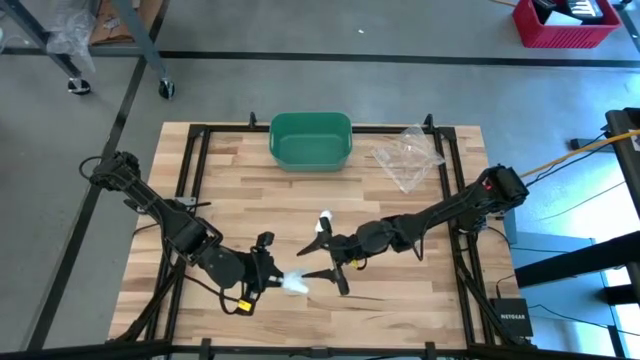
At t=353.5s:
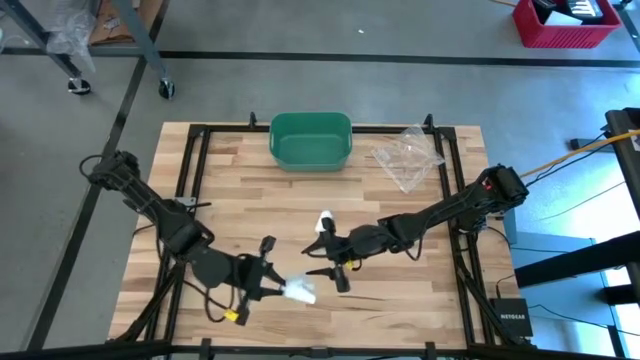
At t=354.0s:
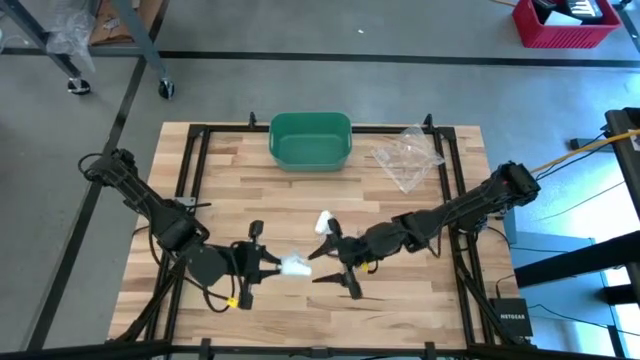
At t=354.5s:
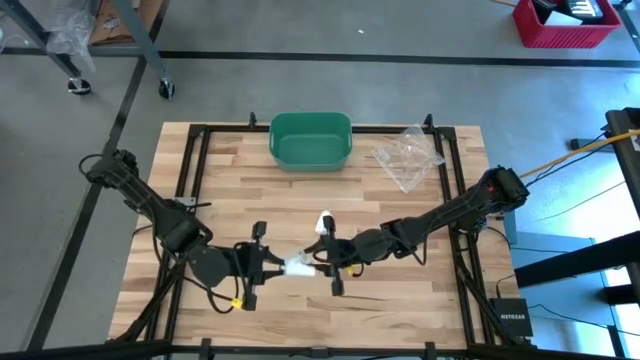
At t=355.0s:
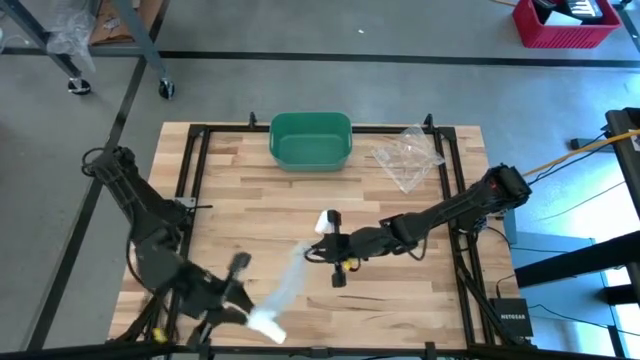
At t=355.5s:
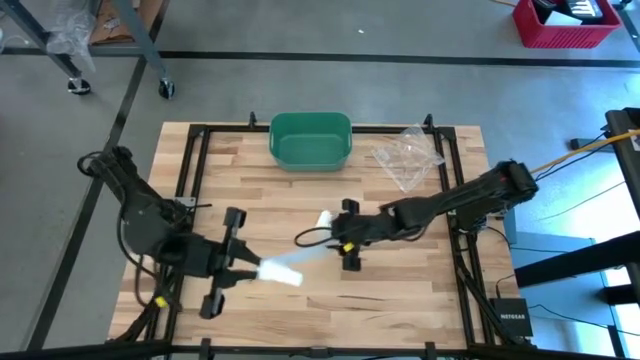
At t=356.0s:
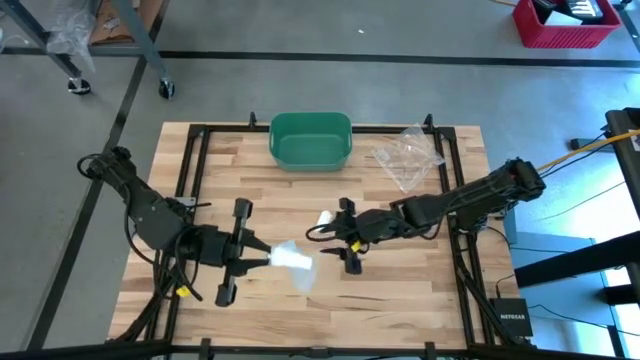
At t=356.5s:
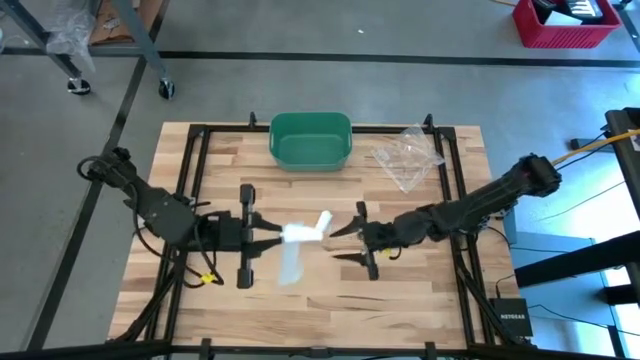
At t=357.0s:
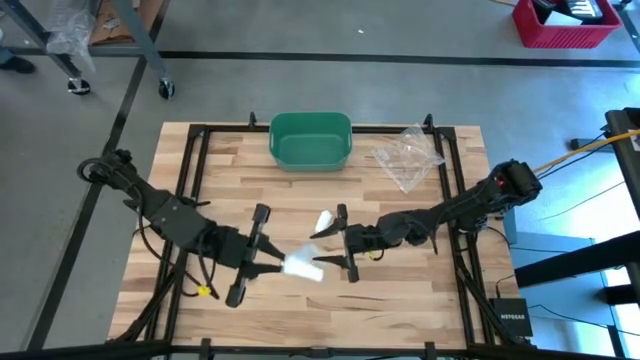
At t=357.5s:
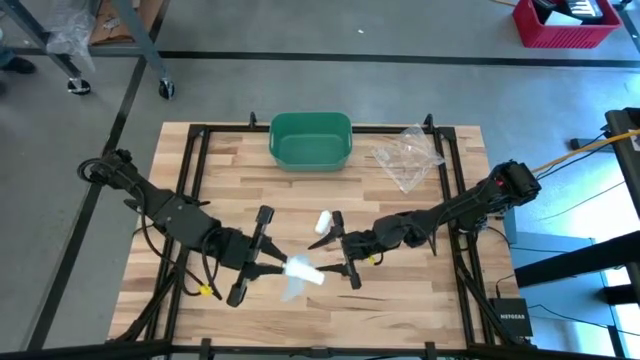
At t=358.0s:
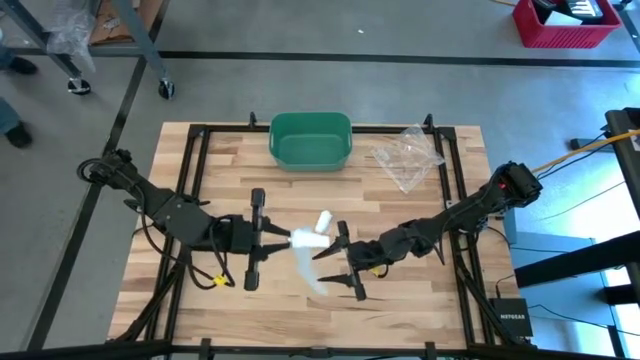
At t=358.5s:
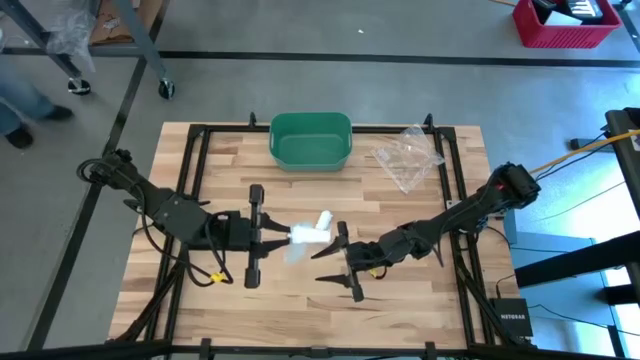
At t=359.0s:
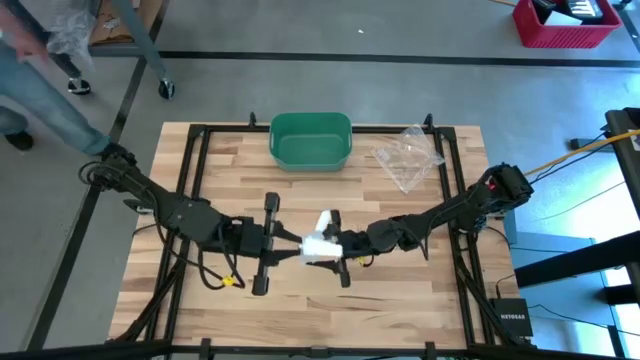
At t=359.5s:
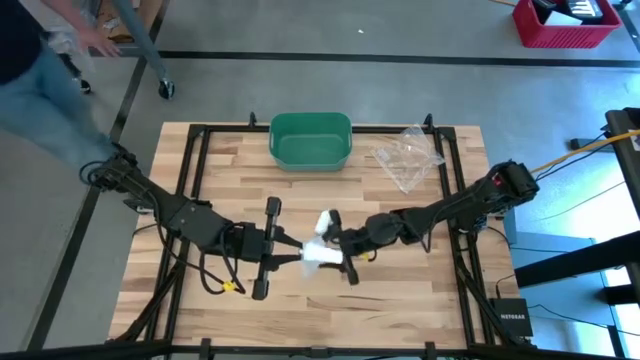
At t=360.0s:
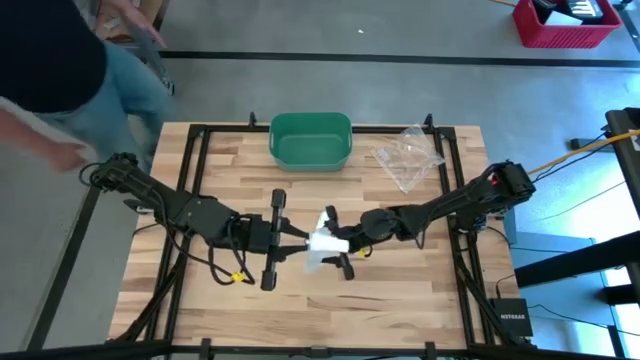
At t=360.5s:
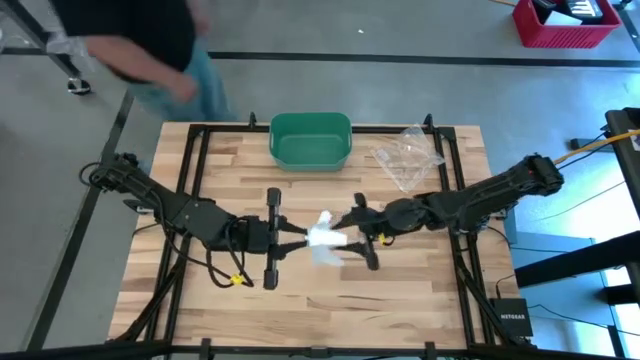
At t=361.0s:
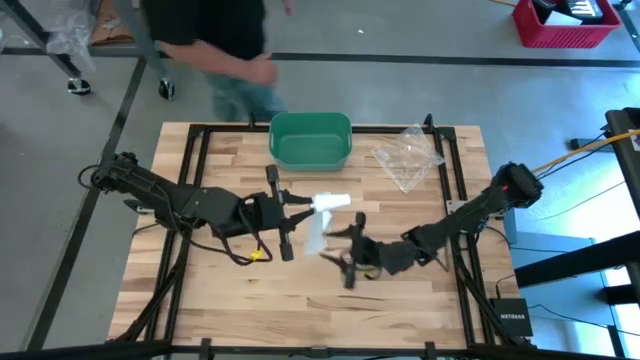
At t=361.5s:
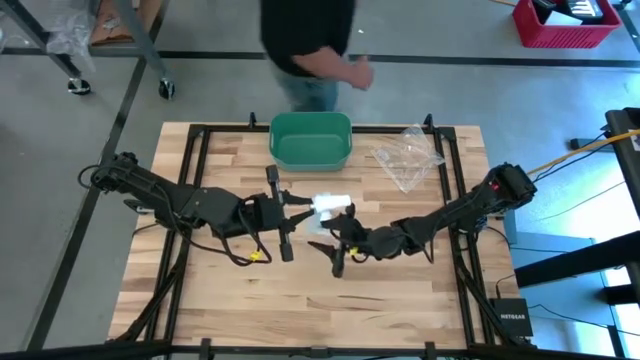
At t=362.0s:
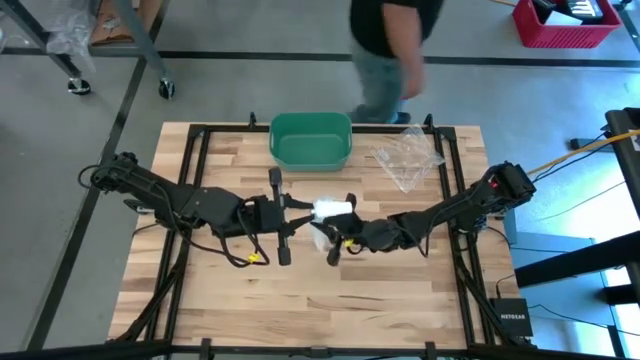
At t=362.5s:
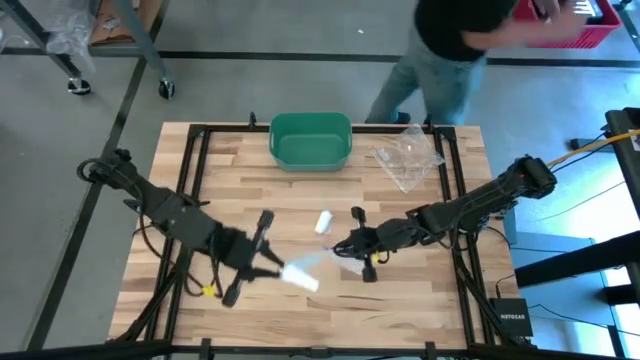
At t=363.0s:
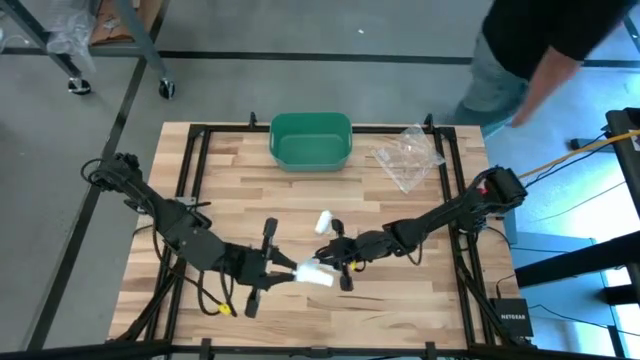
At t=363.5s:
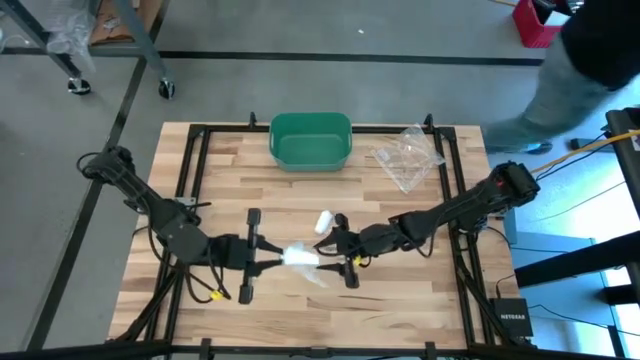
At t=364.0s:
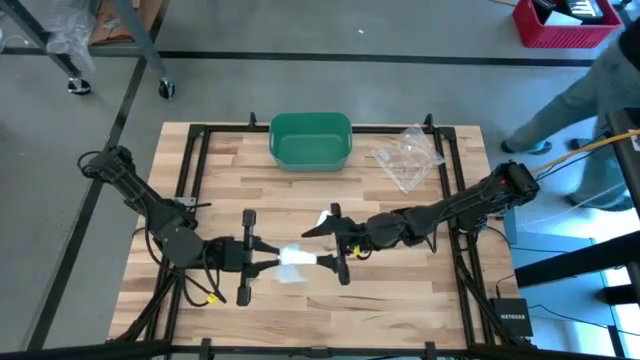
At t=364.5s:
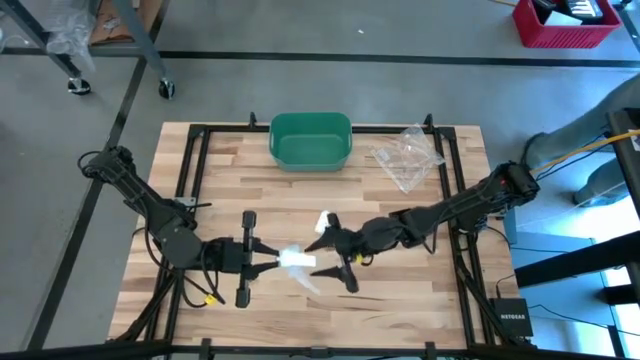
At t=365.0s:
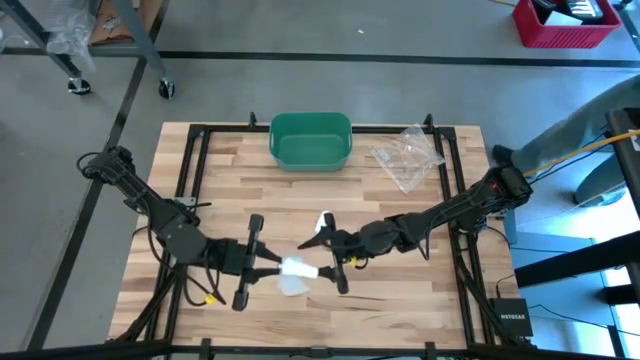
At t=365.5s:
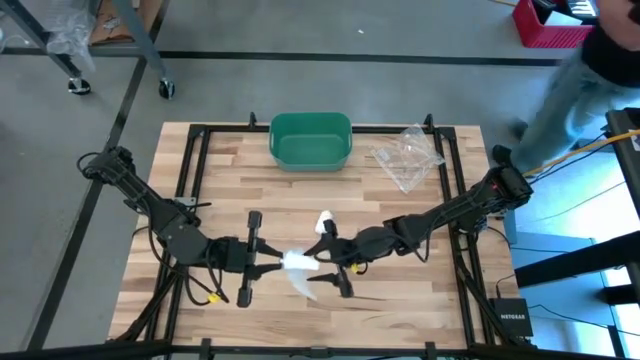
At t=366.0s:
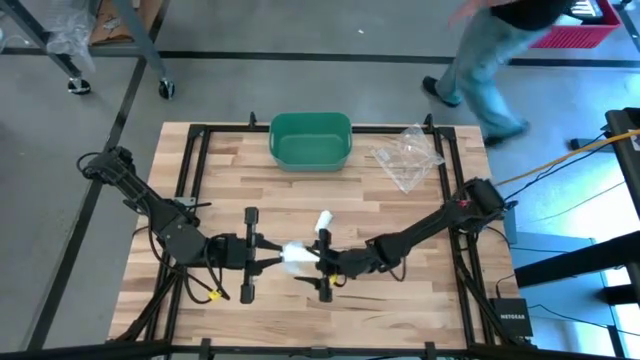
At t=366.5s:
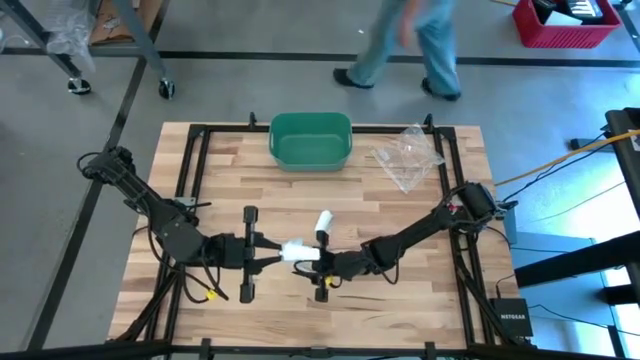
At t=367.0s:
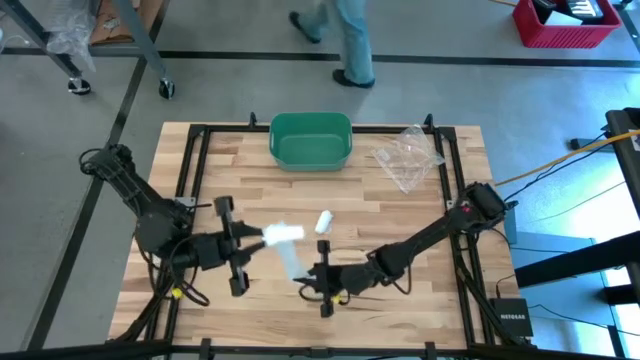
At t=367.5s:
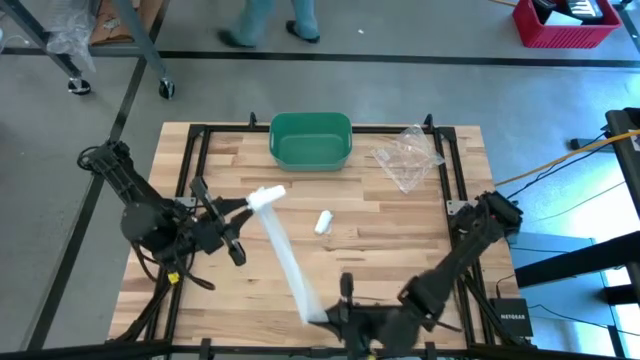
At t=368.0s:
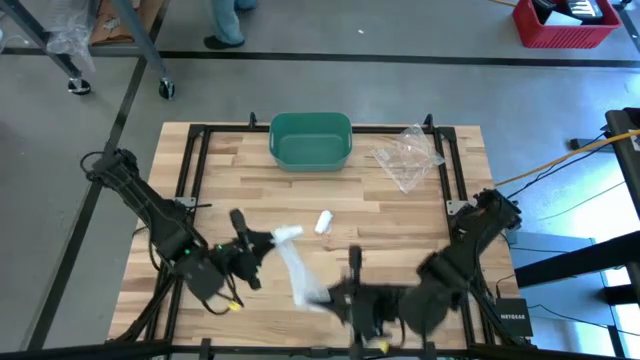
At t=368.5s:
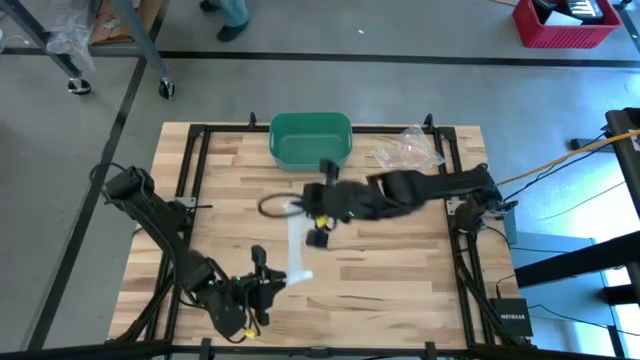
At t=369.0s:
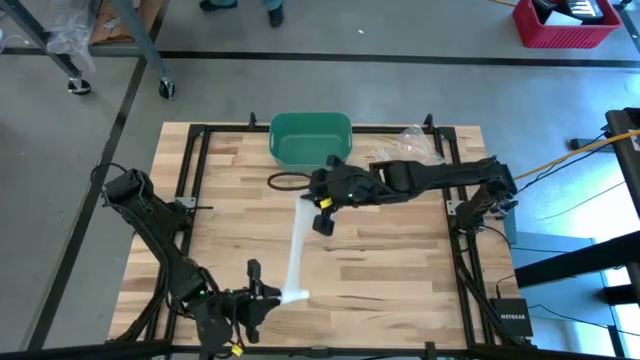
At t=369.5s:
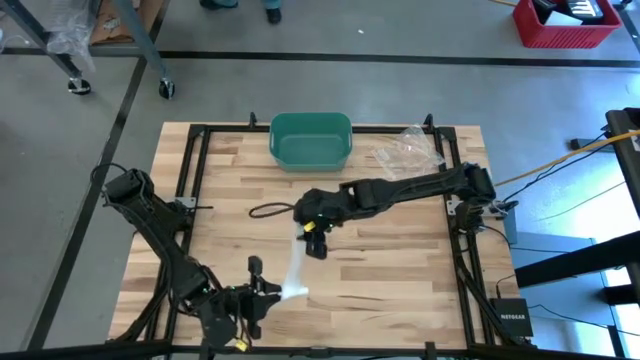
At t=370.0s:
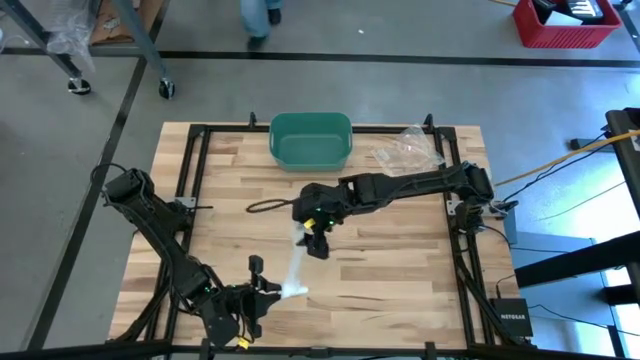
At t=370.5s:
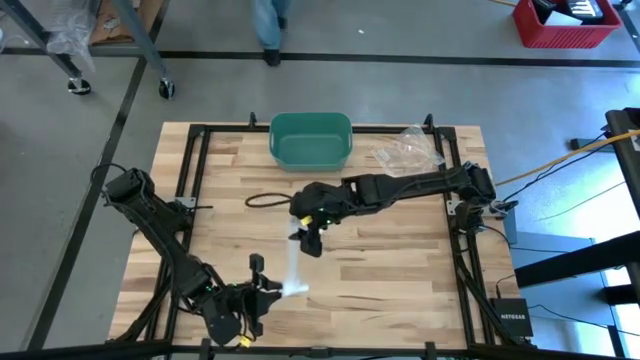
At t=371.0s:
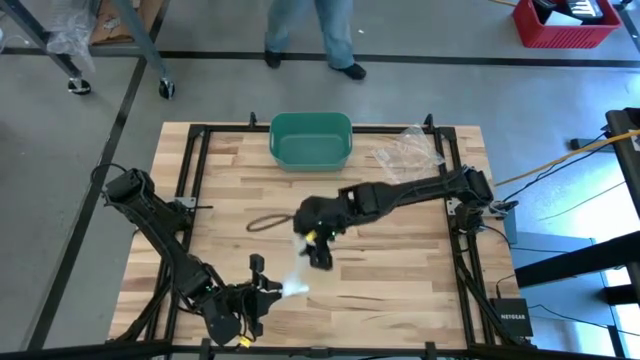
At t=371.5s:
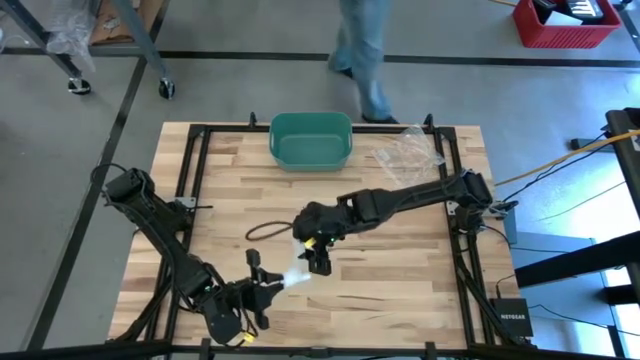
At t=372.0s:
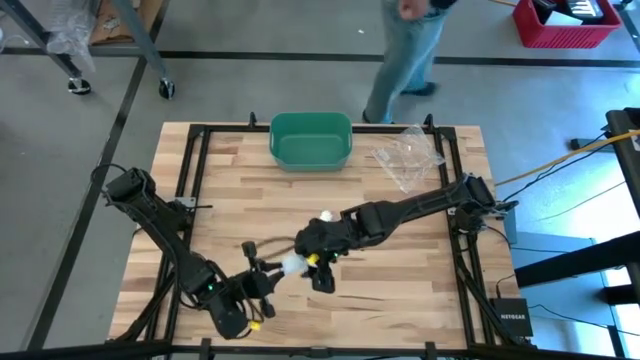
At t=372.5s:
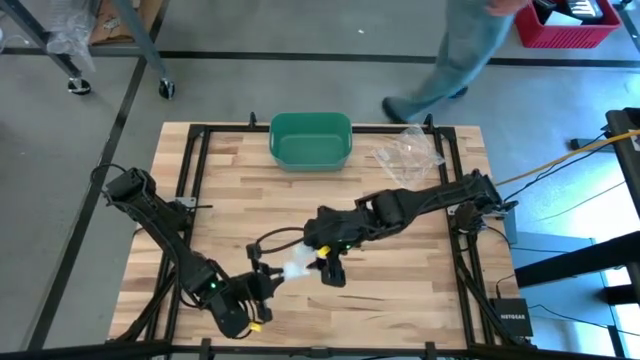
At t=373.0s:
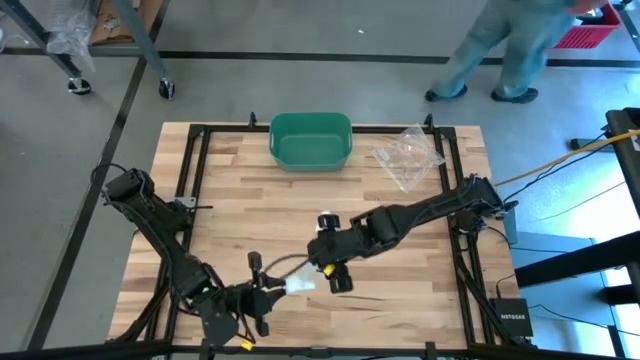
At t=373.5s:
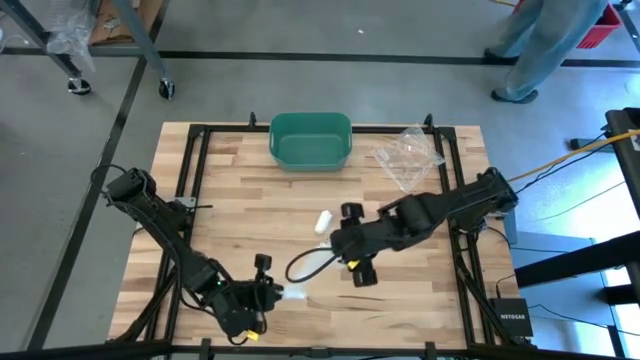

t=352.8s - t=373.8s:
Task: Roll bandage
Roll the bottom white bandage
